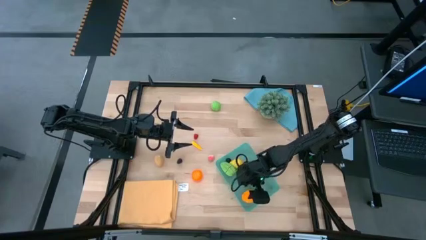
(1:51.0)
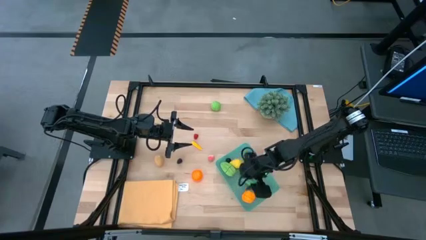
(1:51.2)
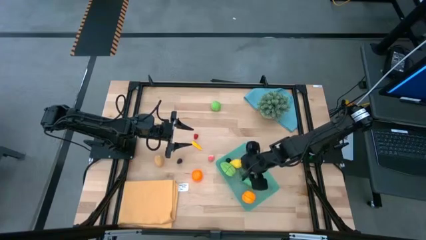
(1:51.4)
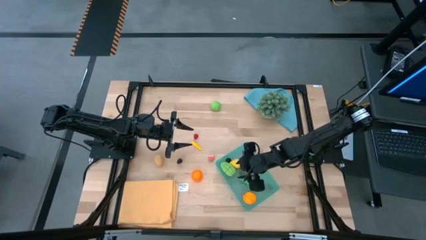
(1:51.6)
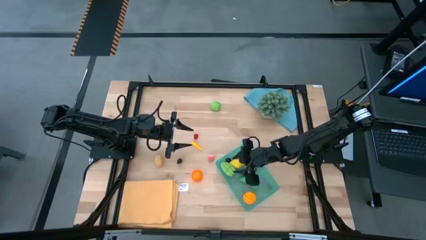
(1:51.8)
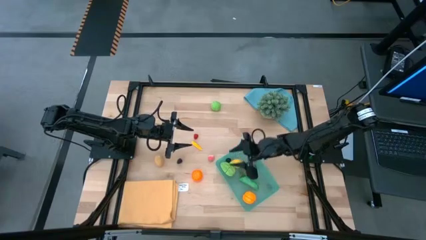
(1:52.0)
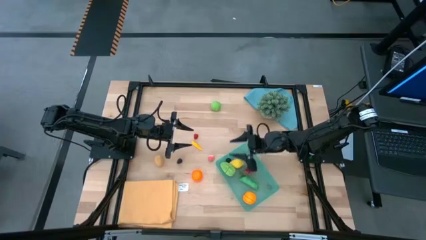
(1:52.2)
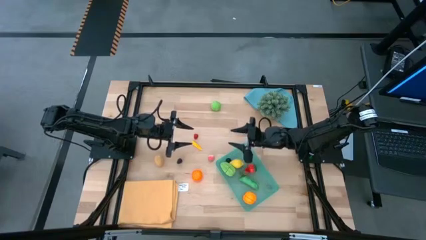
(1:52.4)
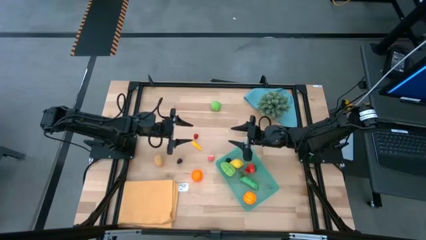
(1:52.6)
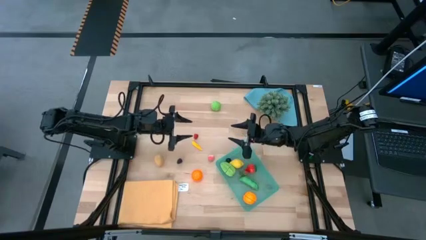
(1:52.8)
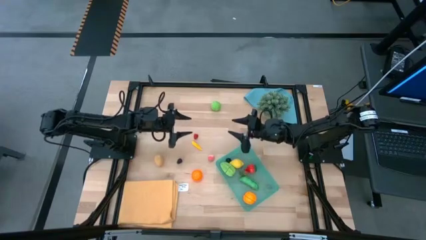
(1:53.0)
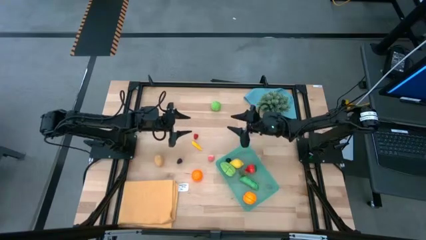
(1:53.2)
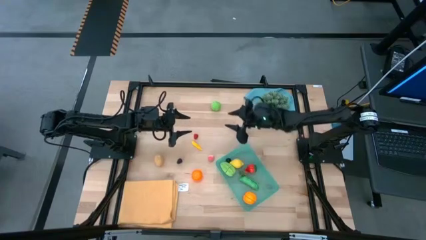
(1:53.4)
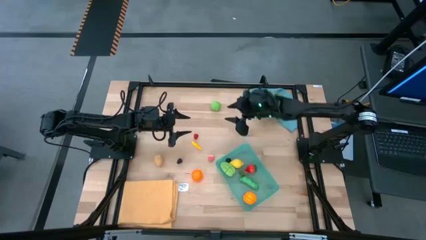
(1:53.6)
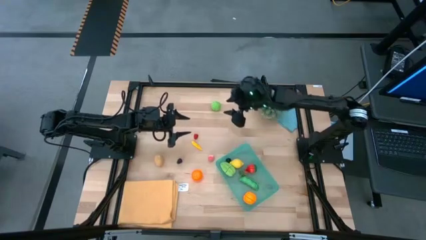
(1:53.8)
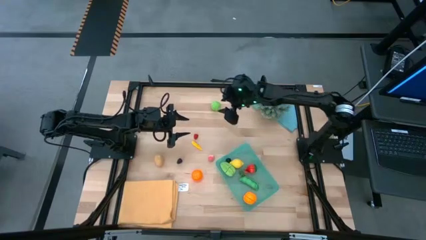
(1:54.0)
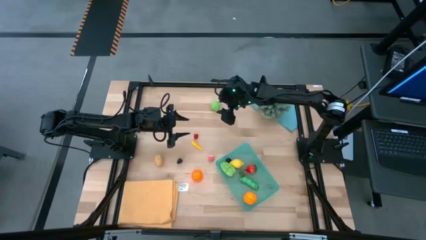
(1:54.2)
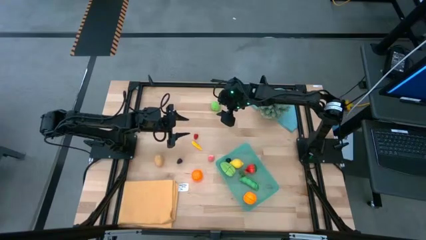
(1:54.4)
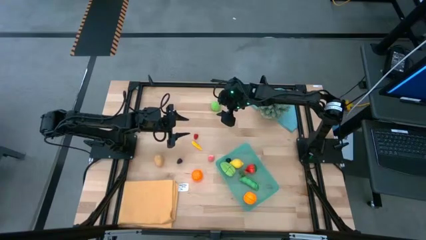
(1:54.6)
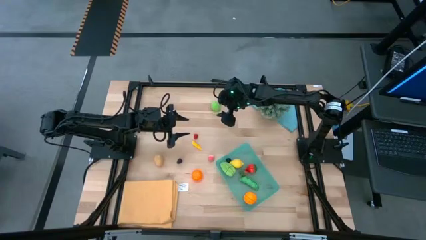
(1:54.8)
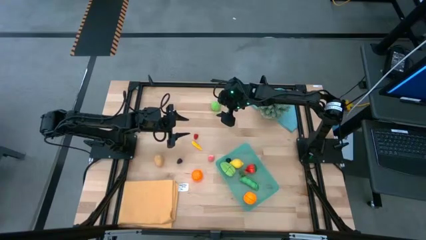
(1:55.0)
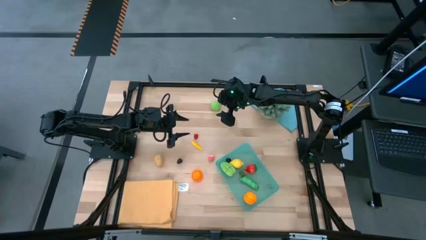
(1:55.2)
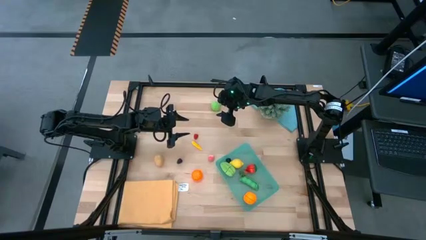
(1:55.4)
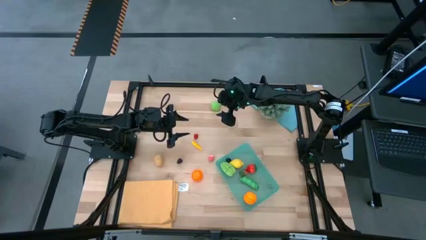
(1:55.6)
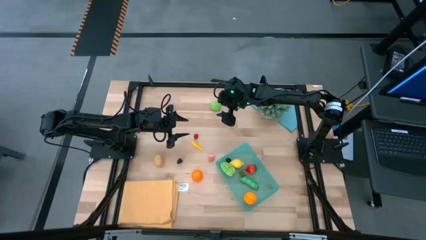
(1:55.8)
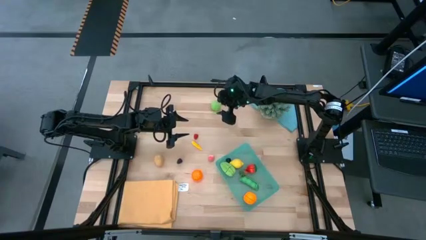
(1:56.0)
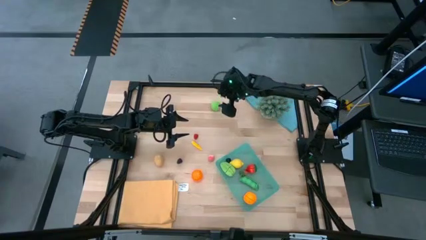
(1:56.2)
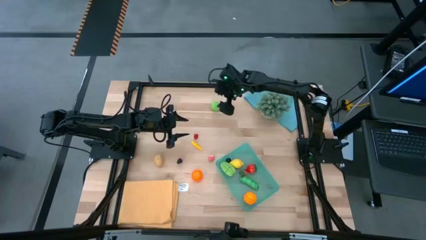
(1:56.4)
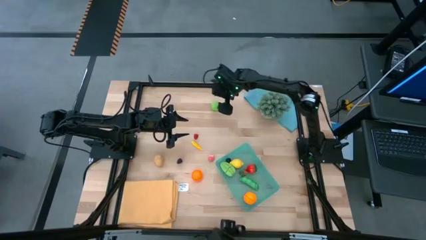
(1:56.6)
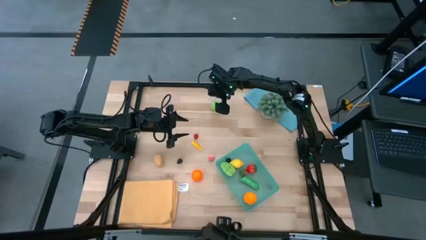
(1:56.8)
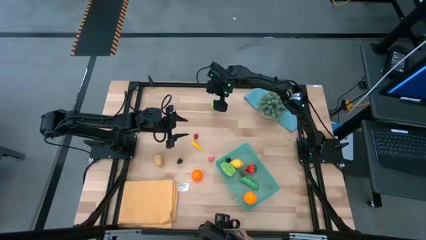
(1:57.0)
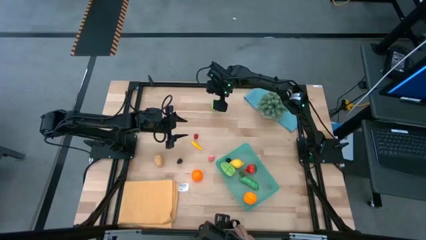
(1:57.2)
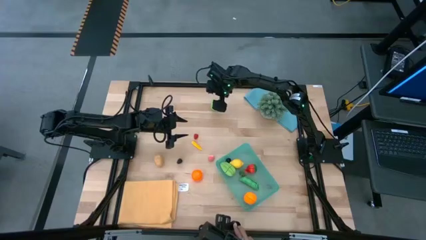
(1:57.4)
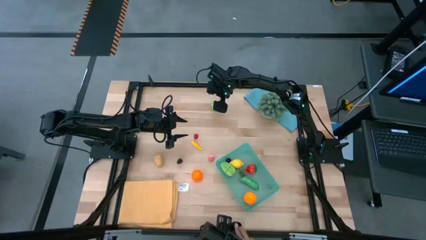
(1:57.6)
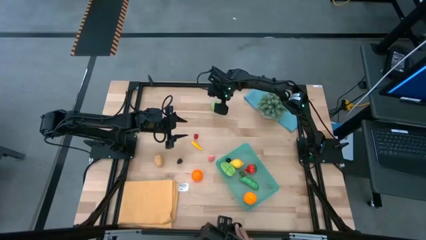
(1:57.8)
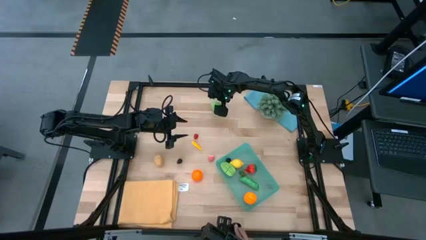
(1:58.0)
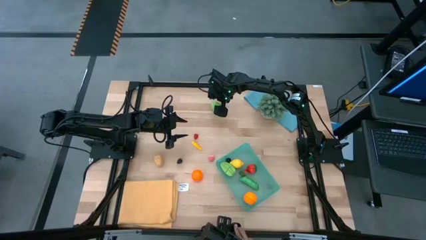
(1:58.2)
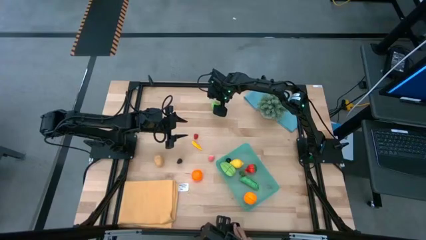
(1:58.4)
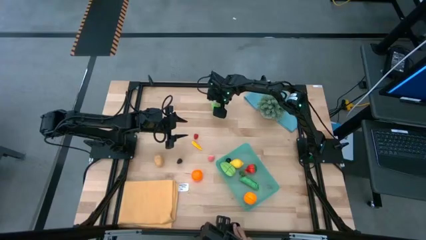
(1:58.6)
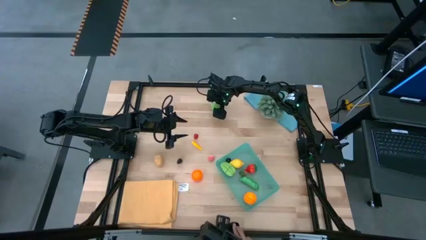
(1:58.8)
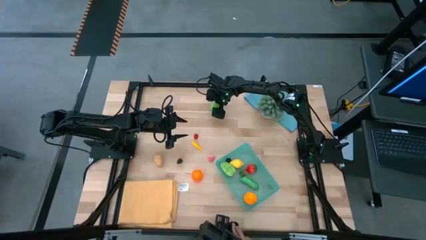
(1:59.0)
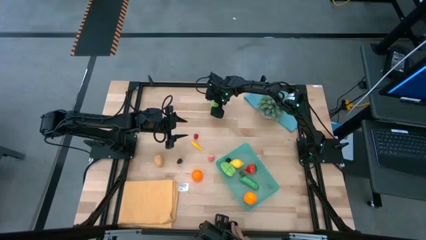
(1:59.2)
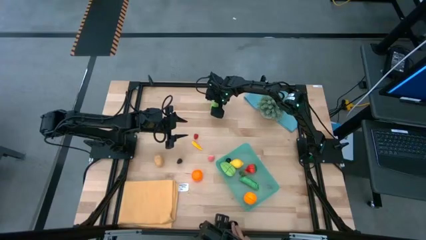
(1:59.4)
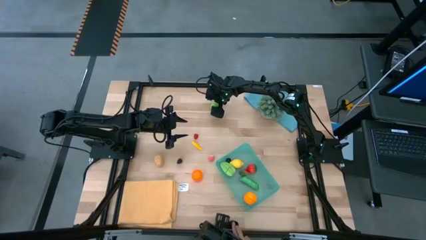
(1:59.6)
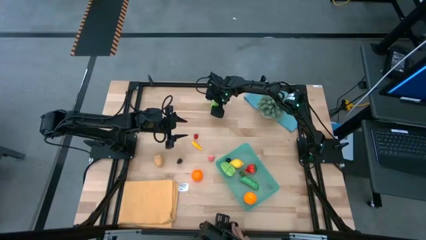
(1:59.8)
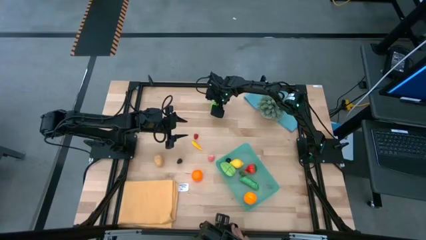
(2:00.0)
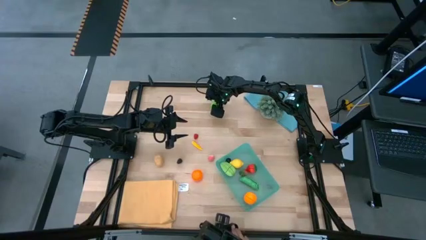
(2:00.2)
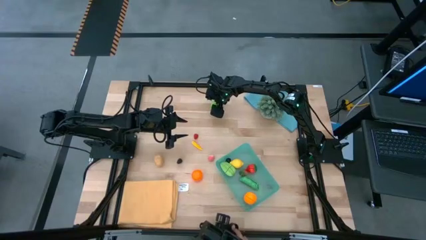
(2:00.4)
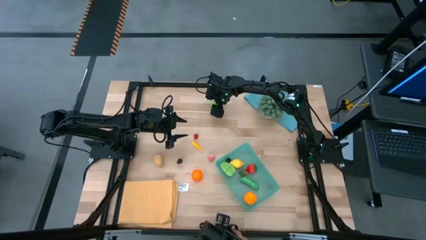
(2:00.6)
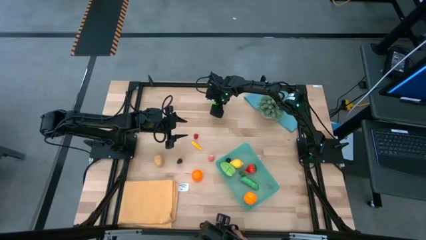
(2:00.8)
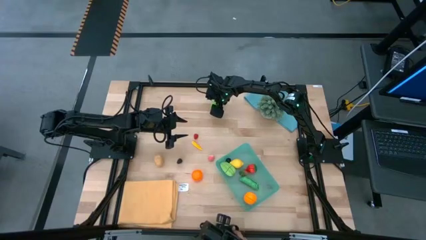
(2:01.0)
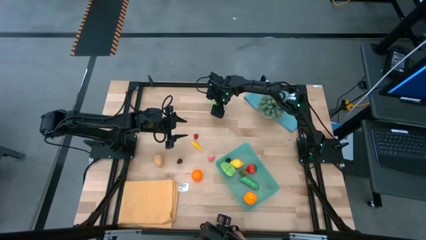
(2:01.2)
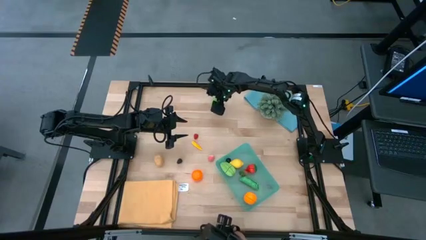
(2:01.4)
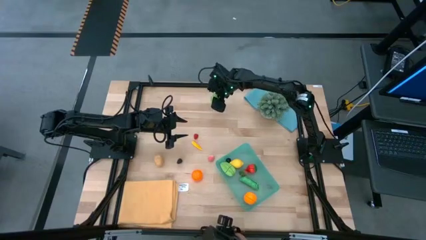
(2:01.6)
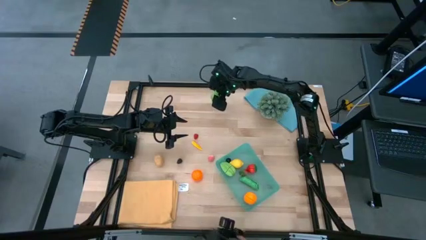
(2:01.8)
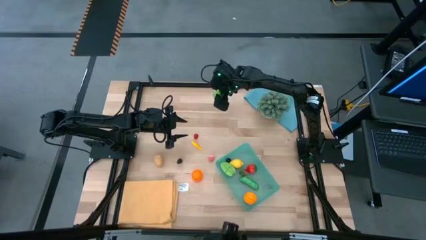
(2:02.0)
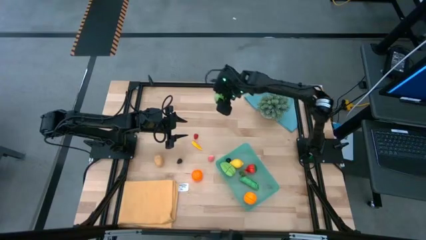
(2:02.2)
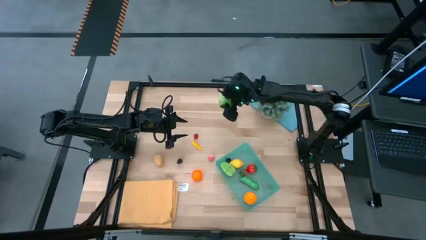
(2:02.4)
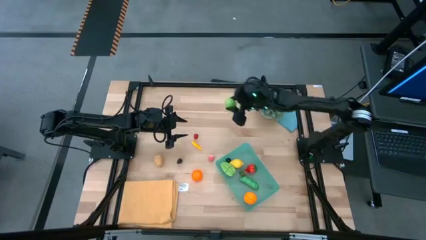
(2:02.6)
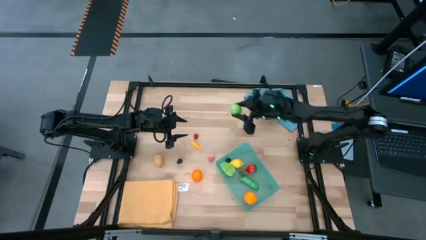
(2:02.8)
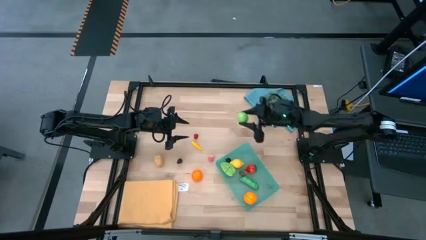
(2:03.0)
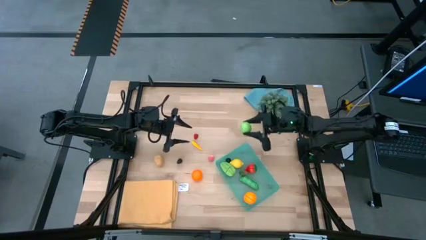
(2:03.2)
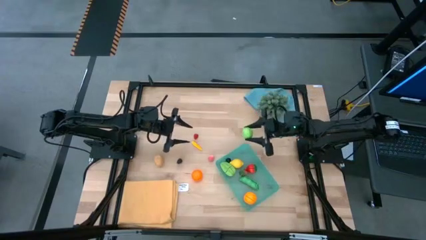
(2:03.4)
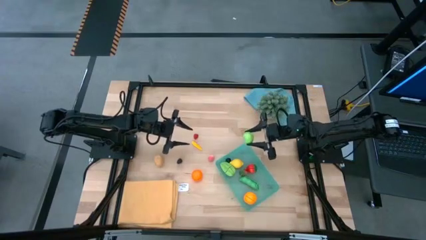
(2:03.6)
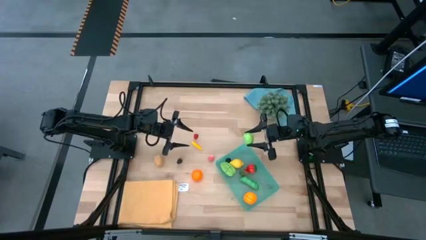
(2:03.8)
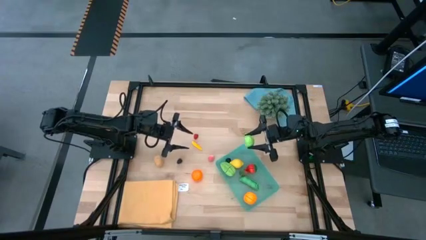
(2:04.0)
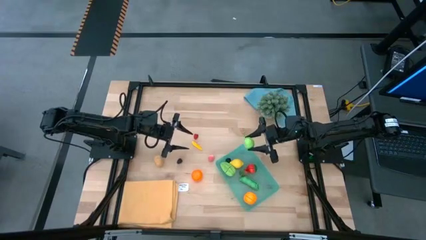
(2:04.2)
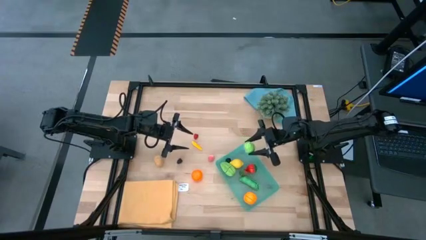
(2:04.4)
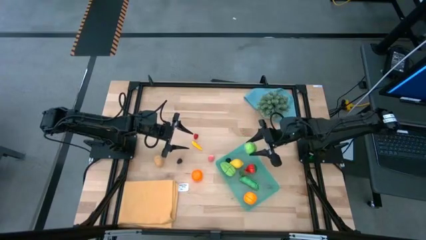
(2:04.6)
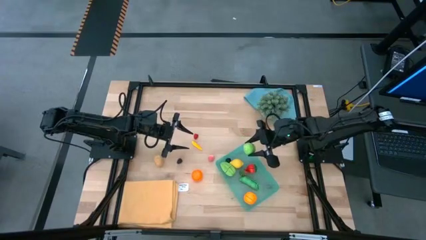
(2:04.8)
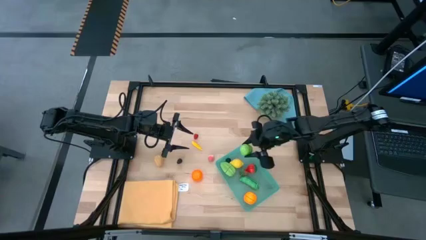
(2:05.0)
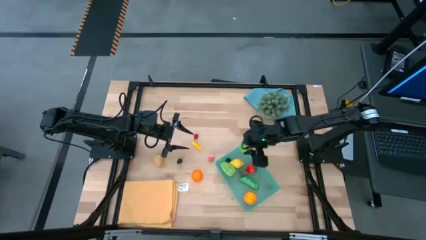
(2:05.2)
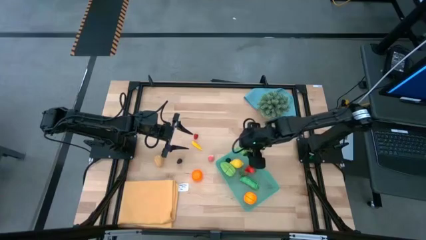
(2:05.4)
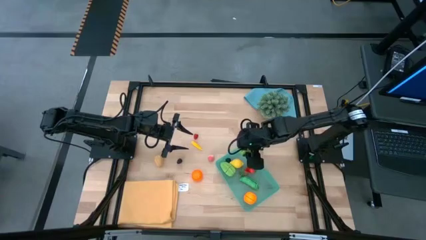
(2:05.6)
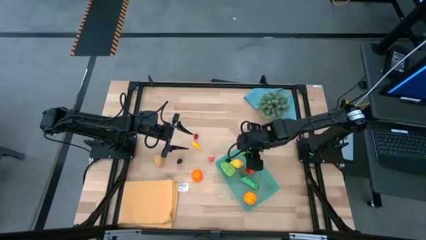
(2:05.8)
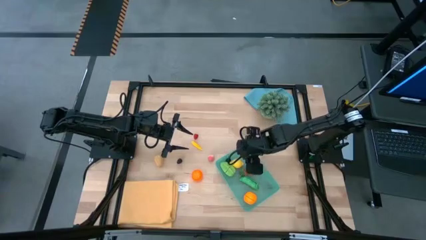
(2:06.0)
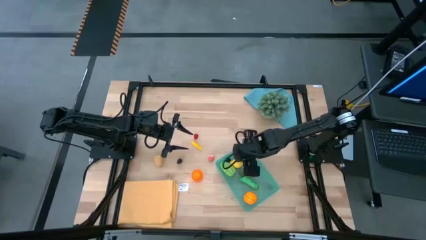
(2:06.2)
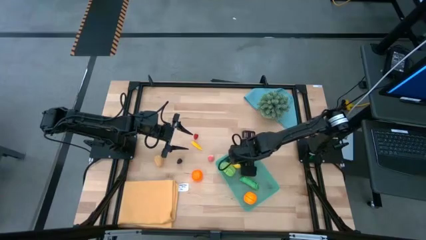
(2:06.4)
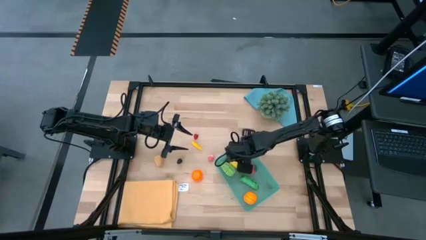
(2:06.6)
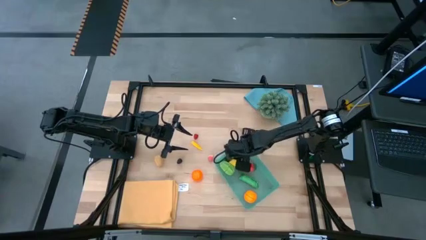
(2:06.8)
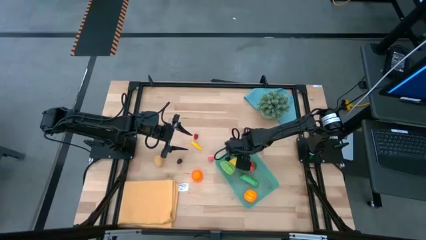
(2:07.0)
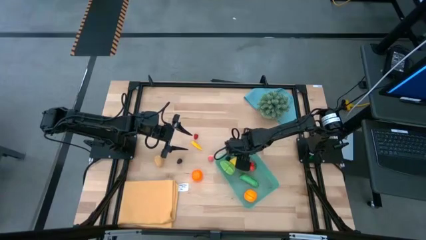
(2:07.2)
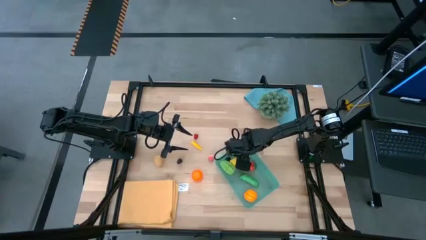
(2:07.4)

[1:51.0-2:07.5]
Task: Pick and placing Produce into tupperware
Put the cabbage into the green bin

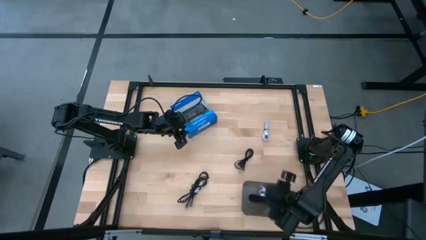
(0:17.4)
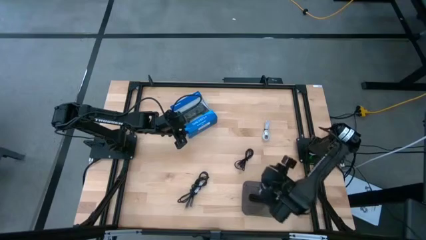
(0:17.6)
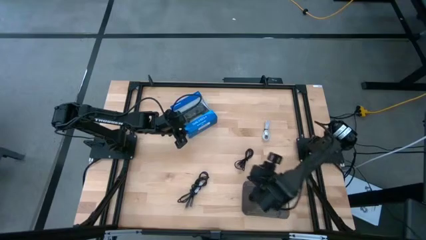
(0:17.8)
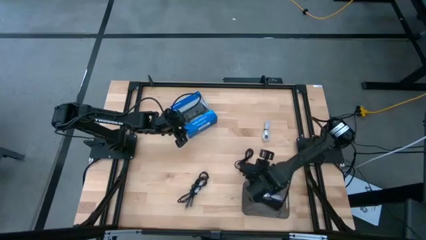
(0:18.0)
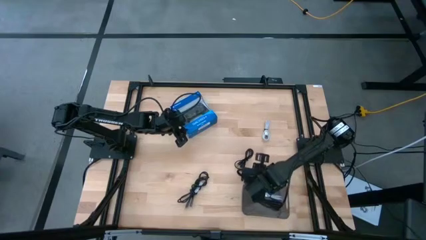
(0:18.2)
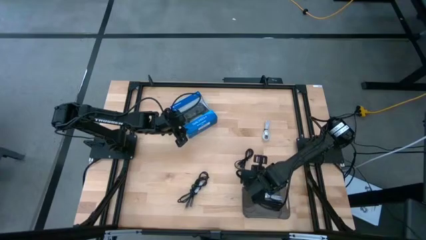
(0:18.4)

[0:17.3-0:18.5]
Task: Pick and place USB-C Cables
Adjust the grey transparent bin
